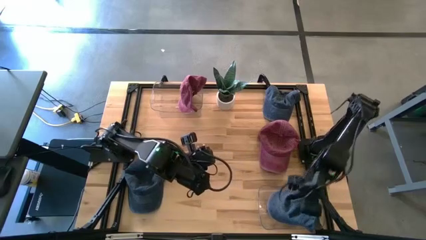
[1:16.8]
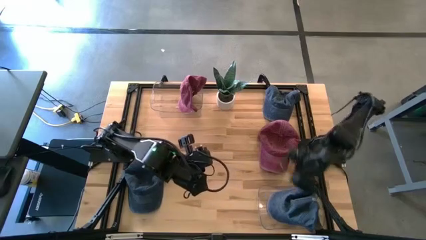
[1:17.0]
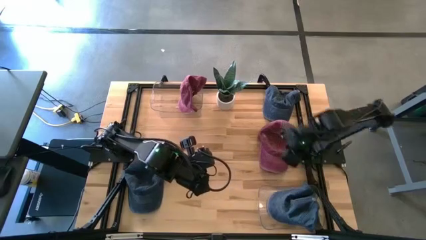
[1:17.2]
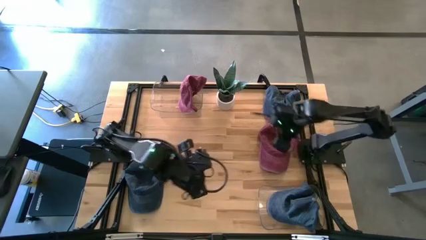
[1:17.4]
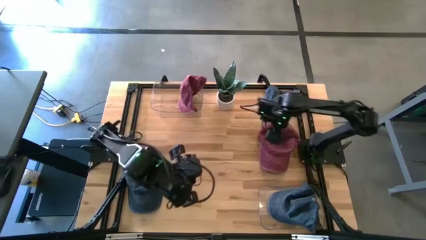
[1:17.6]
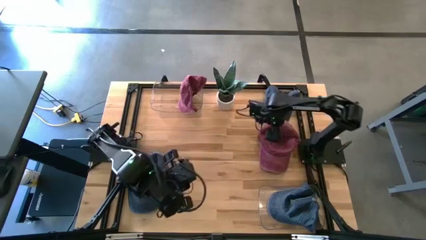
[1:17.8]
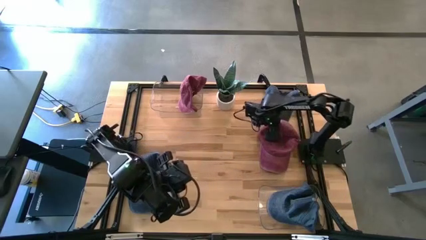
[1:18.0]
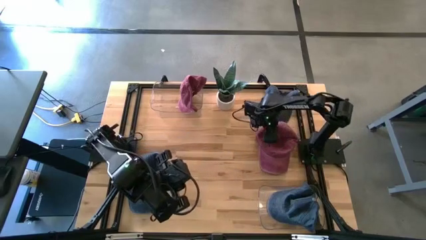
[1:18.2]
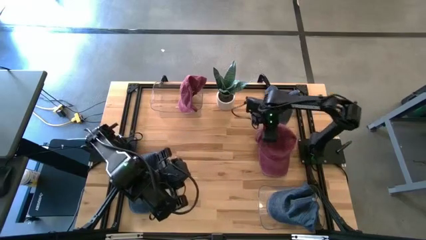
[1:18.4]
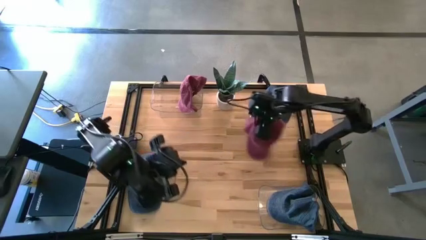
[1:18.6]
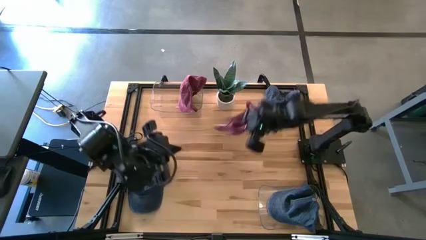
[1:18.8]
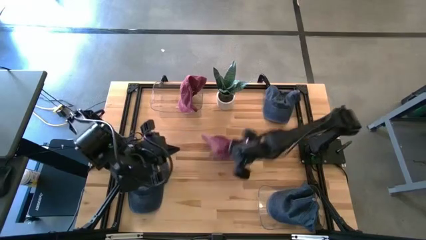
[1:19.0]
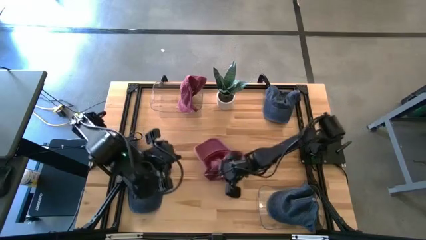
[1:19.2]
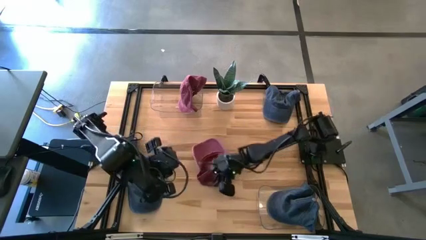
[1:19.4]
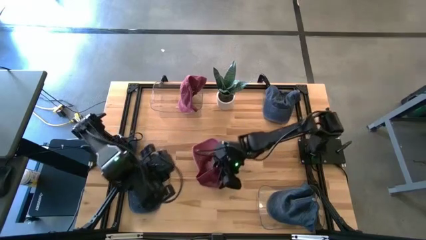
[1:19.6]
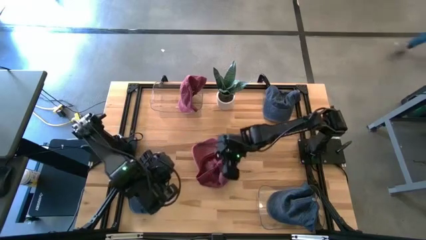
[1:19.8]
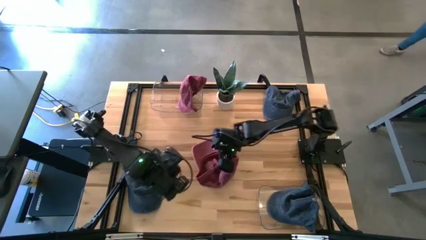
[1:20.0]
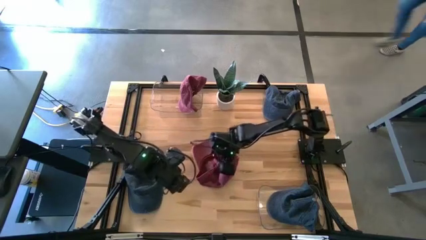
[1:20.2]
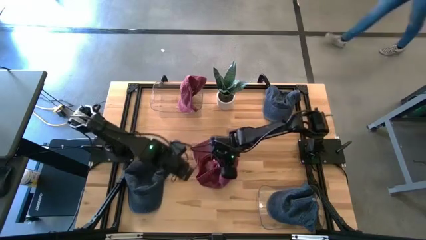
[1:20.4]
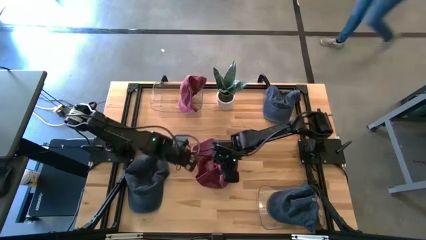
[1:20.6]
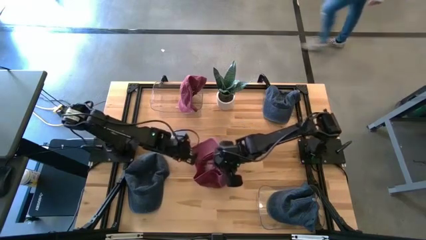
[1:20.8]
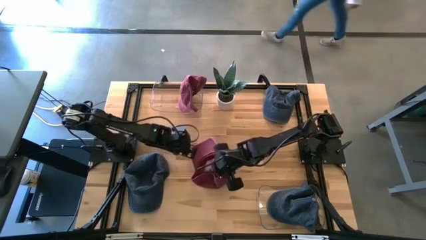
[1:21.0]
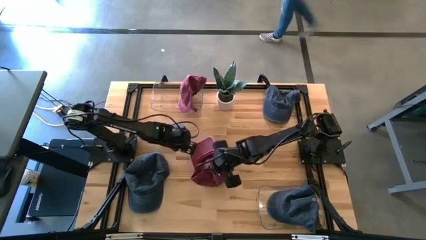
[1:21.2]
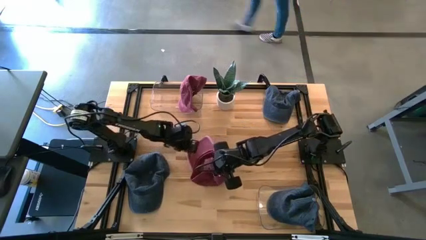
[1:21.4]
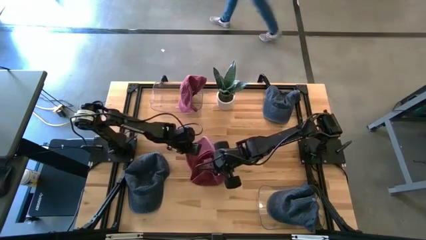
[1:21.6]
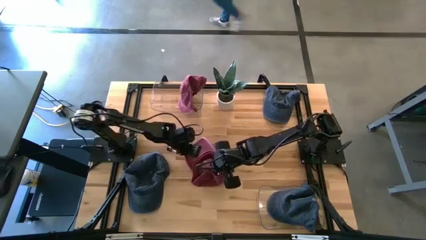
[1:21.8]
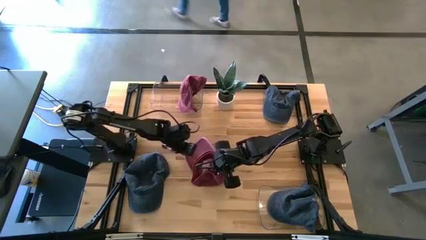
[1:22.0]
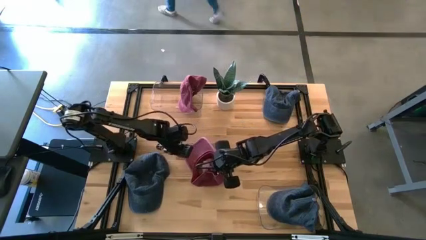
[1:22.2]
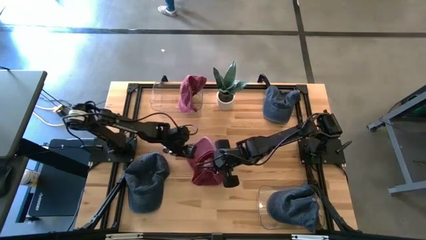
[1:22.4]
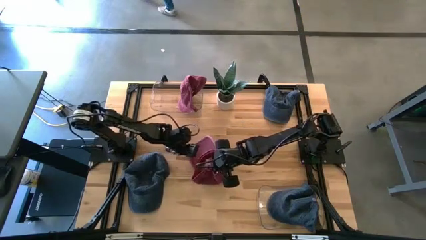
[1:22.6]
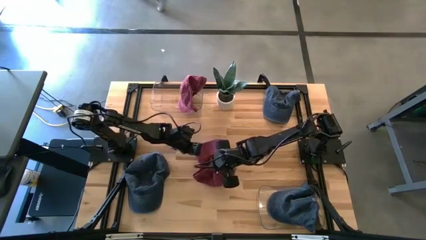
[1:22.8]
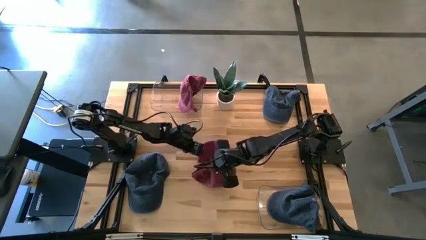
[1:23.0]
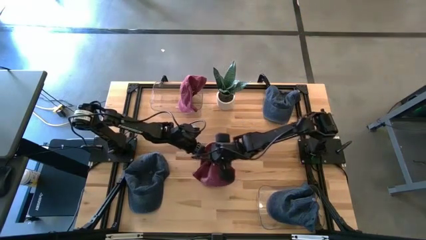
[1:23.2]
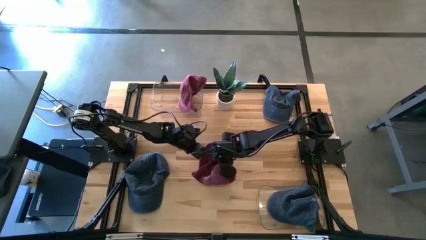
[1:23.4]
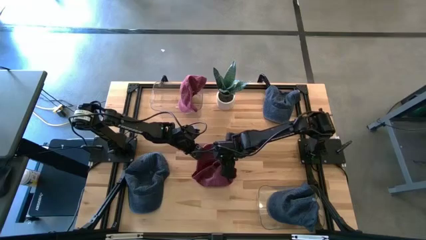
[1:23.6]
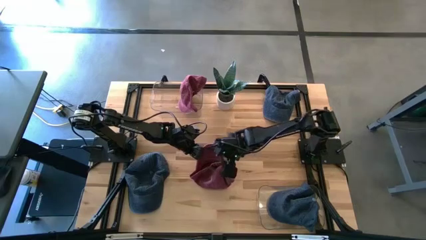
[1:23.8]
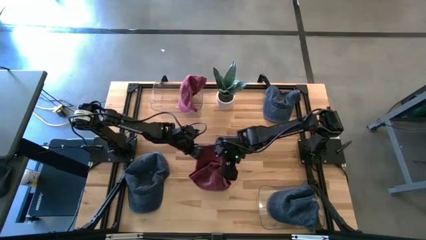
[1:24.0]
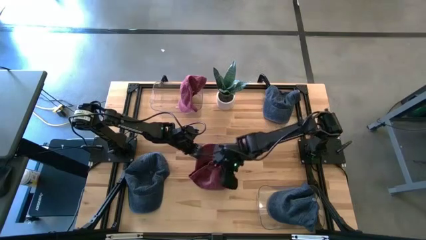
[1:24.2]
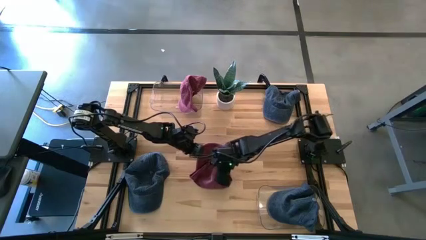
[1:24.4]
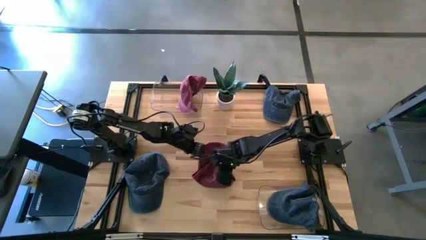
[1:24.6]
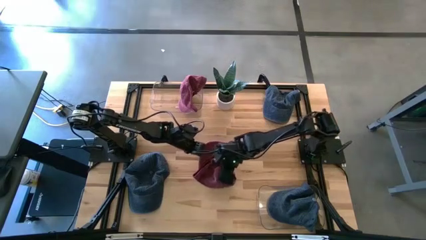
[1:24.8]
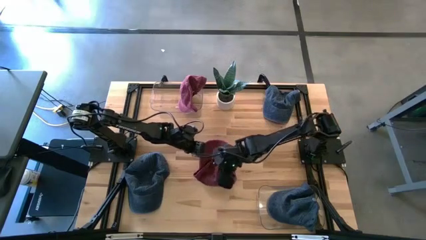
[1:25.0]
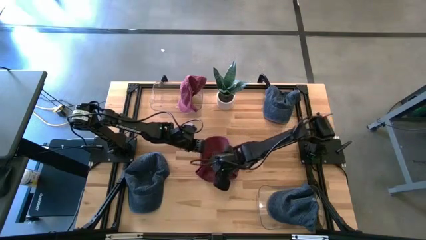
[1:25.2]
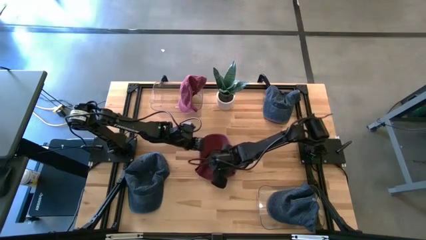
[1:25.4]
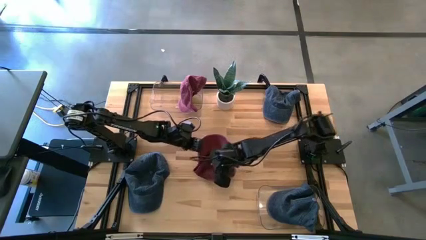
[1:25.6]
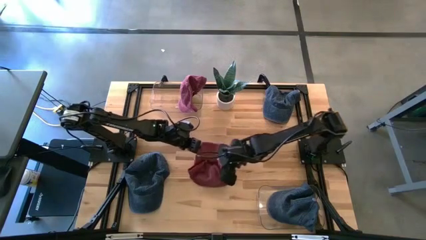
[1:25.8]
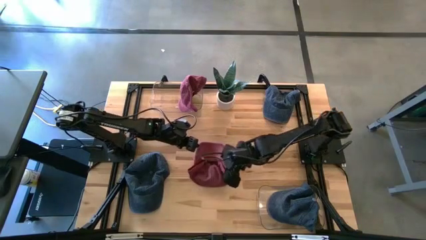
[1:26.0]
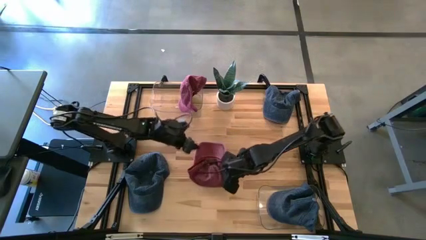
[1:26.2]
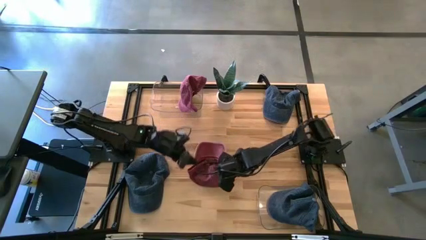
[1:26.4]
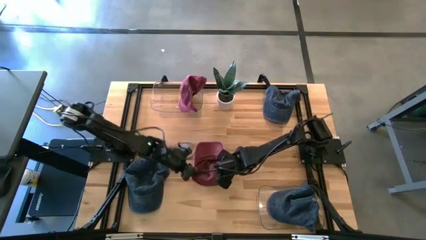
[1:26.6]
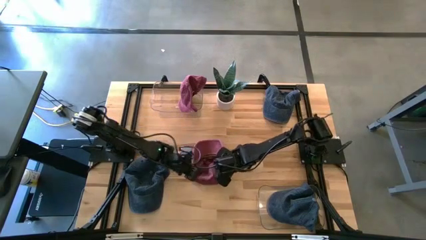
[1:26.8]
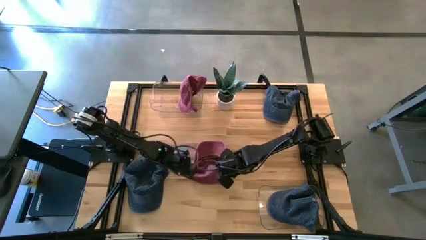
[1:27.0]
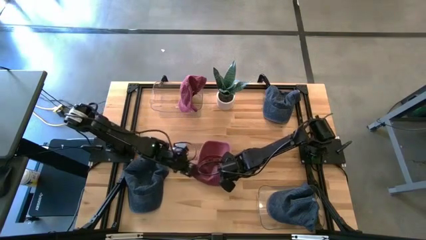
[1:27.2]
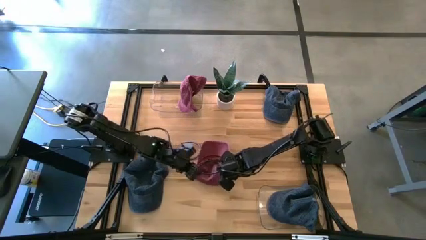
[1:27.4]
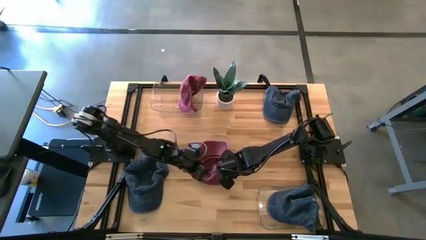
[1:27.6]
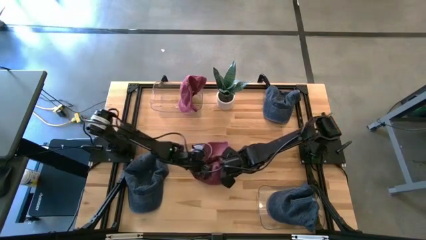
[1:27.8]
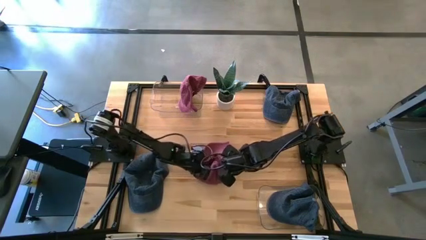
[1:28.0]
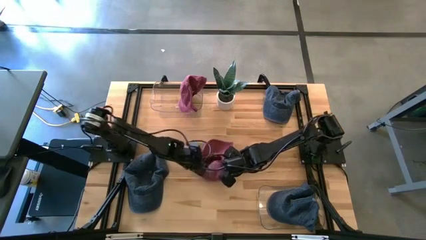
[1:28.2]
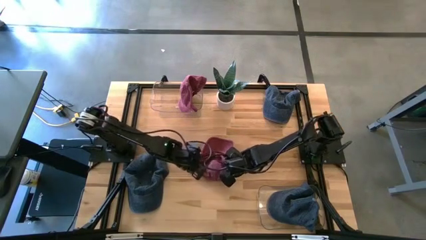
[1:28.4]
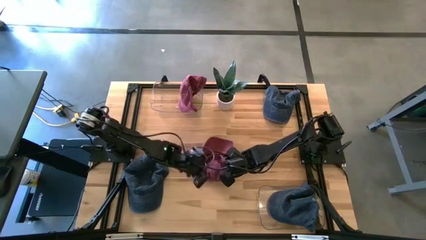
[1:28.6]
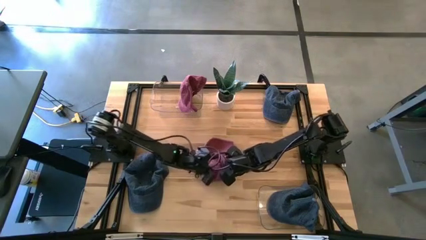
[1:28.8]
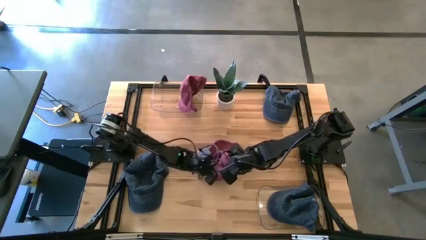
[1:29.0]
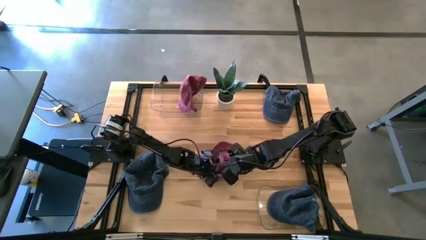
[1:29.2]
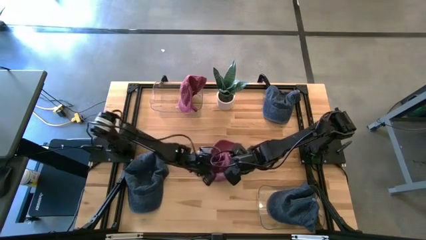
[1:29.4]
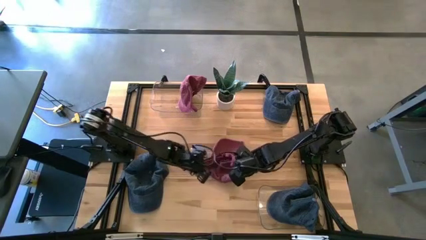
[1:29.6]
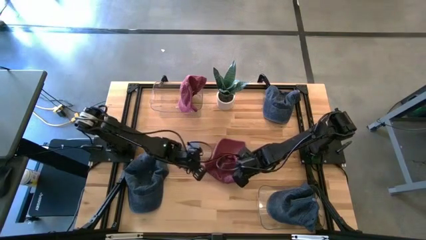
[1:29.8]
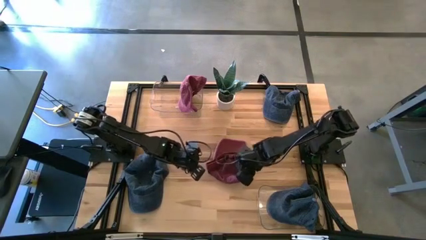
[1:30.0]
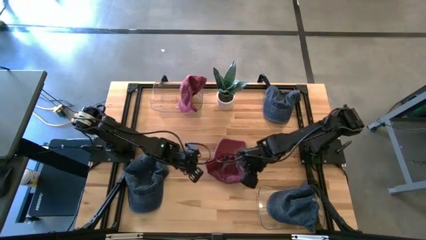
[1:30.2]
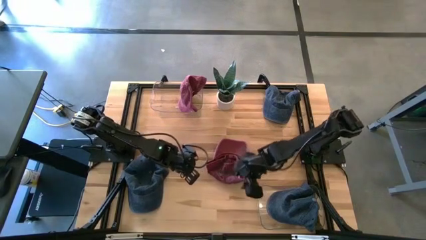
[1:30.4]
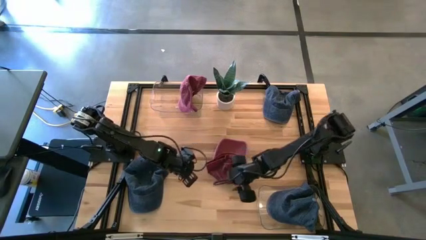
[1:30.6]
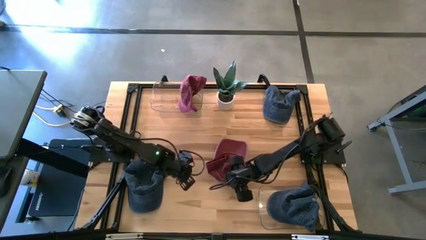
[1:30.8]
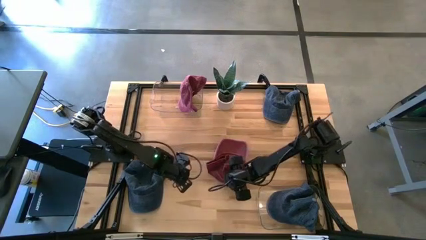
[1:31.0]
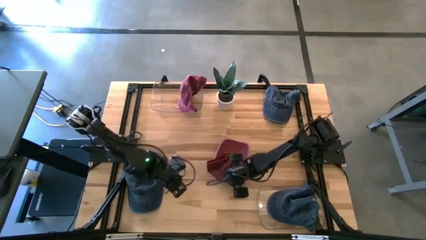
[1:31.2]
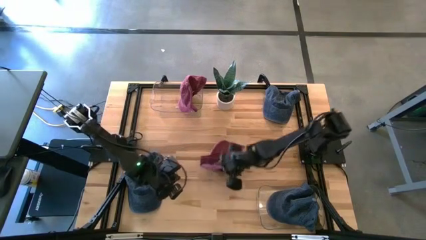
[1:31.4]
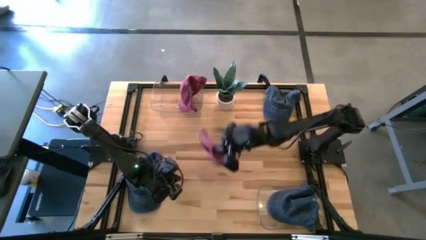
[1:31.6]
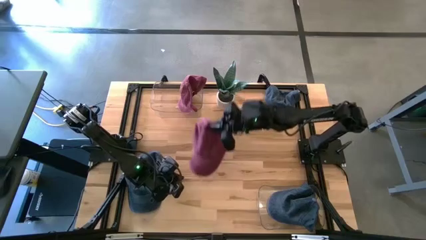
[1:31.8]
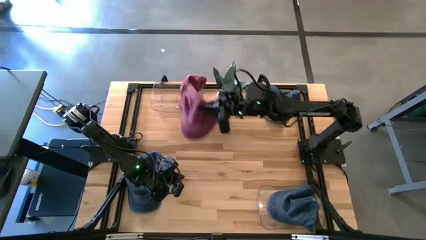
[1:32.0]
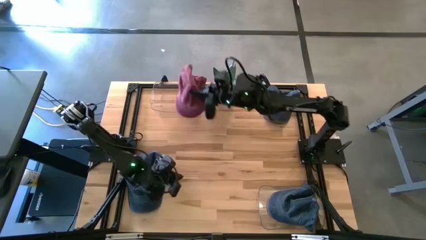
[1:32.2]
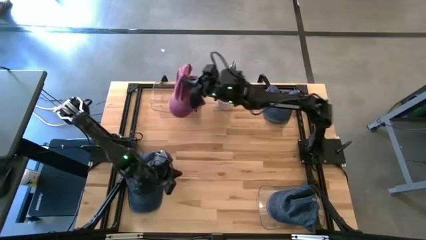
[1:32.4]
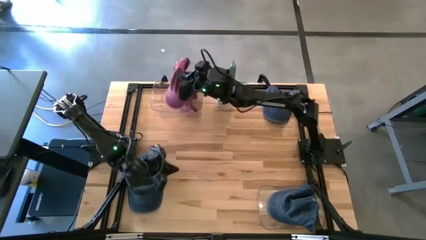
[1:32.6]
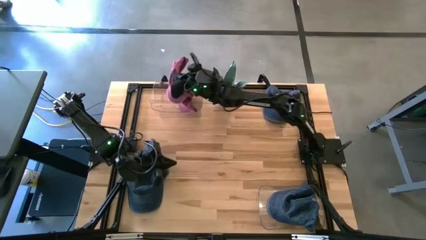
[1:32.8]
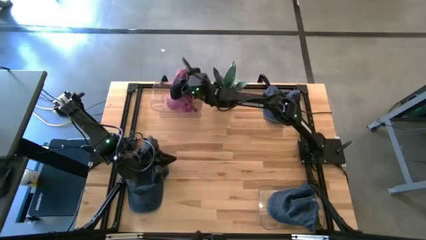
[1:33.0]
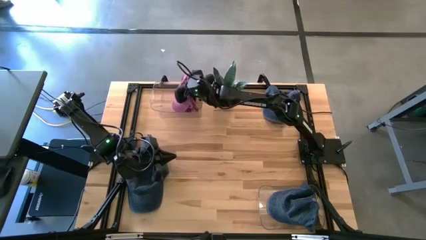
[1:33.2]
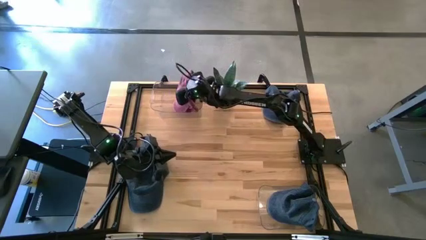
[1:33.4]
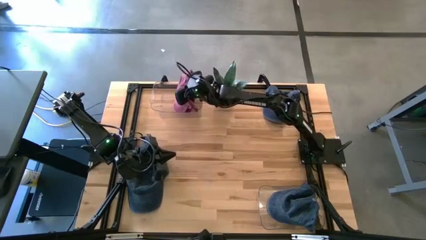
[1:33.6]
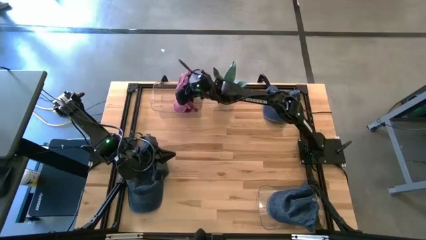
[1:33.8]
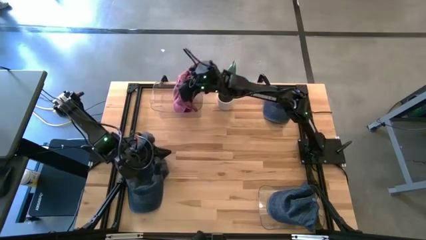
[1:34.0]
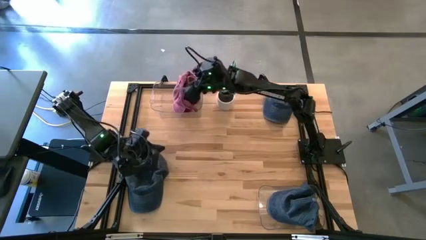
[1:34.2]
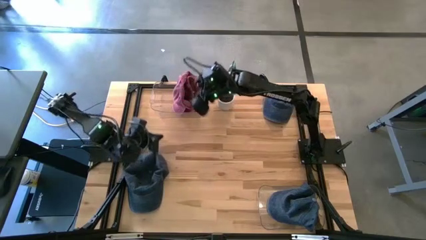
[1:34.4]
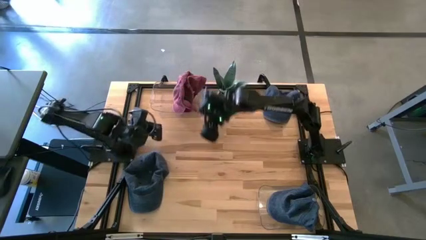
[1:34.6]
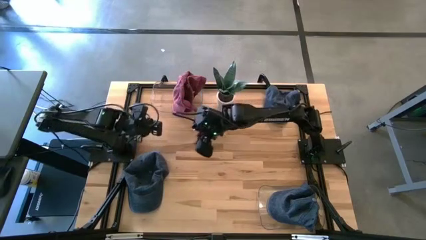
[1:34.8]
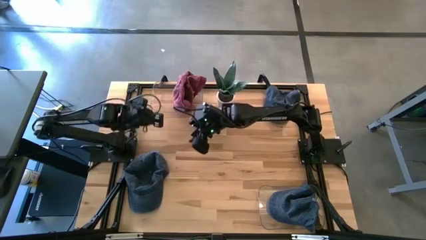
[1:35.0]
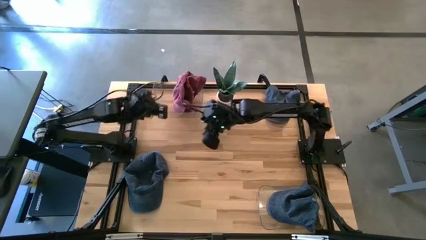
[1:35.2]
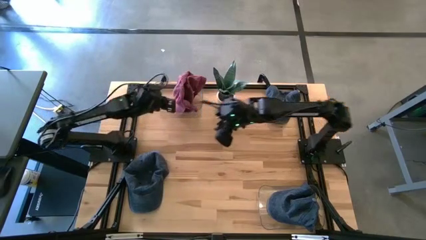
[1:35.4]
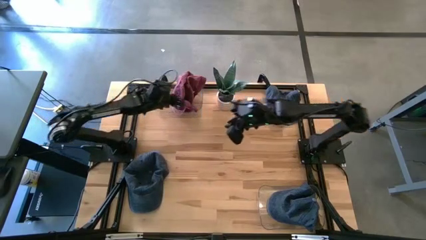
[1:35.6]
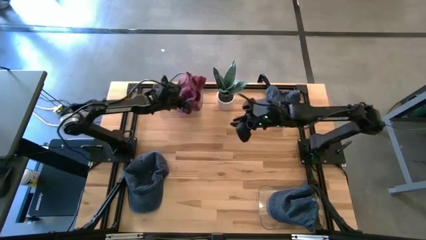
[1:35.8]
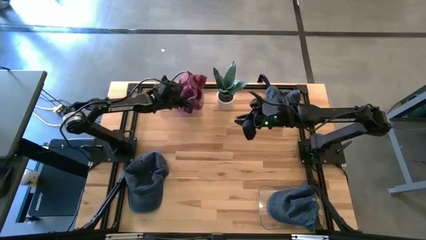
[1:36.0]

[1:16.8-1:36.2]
Task: Pick & Place hat
Put the red cap into the top transparent bin
